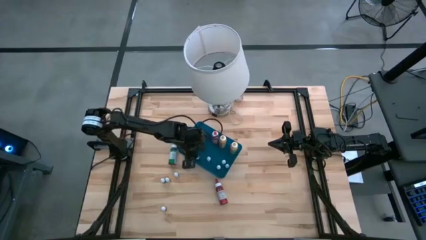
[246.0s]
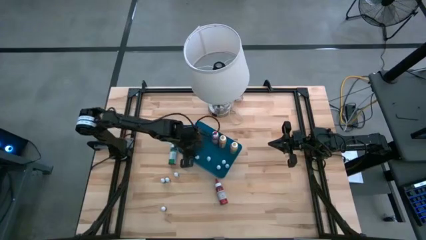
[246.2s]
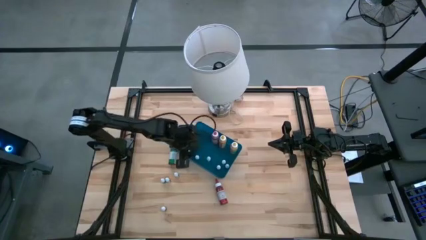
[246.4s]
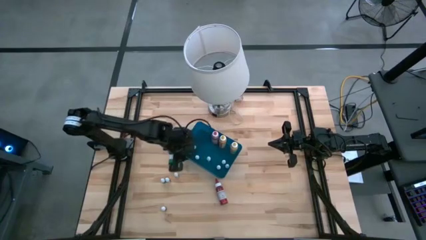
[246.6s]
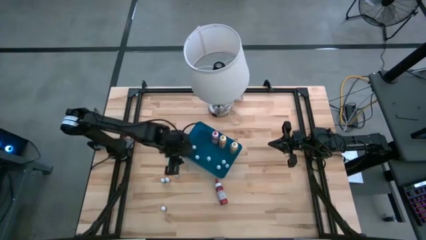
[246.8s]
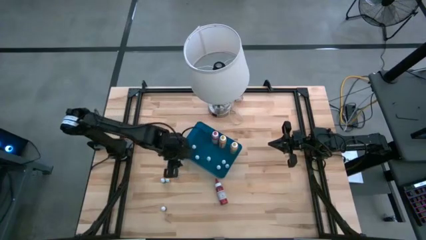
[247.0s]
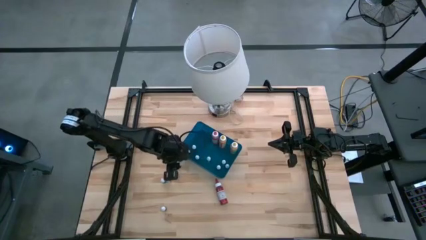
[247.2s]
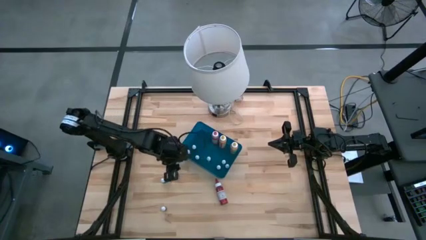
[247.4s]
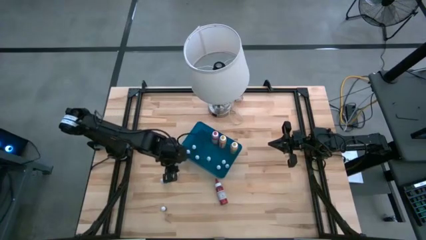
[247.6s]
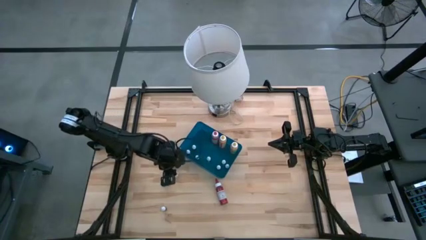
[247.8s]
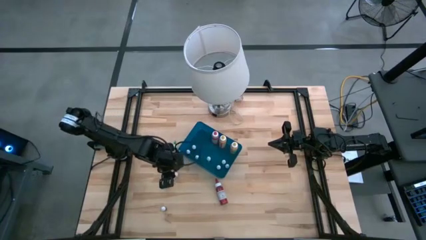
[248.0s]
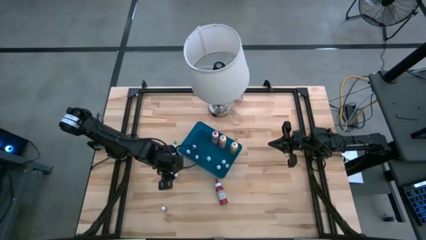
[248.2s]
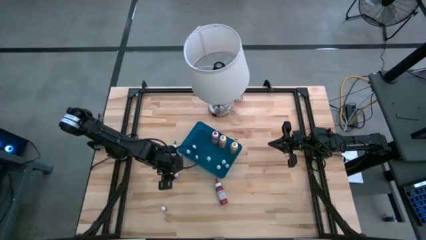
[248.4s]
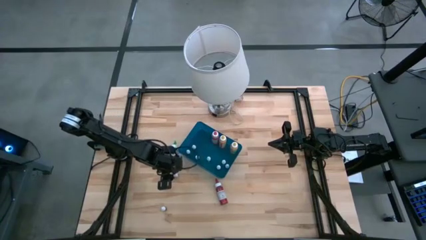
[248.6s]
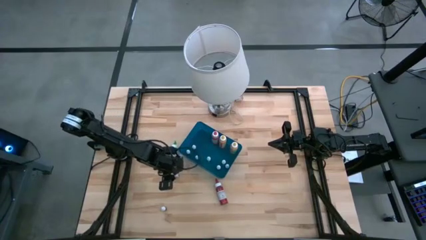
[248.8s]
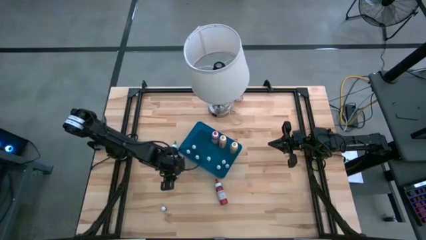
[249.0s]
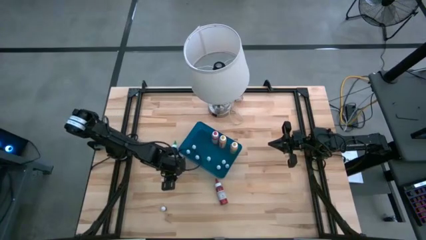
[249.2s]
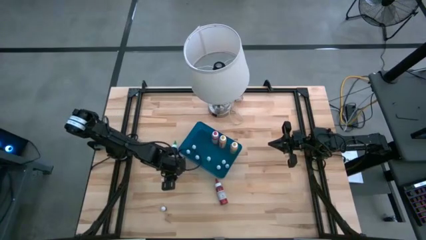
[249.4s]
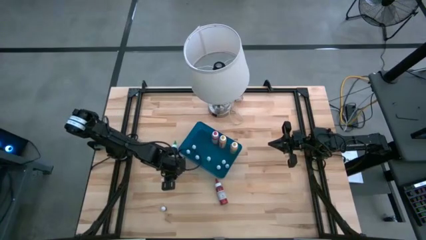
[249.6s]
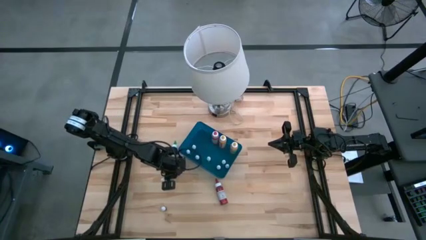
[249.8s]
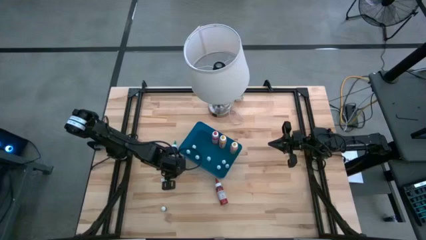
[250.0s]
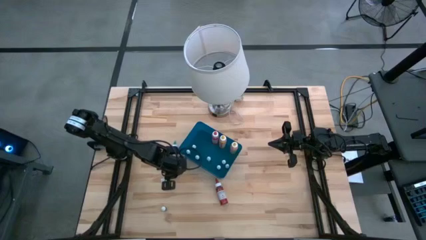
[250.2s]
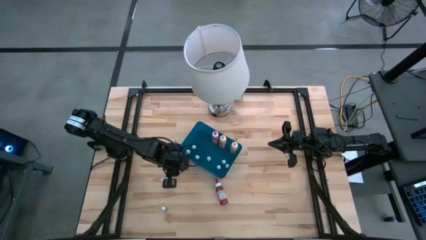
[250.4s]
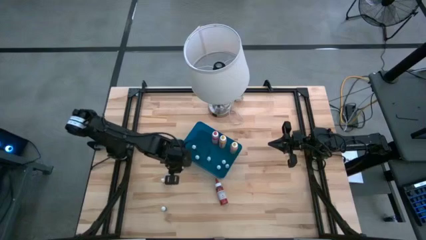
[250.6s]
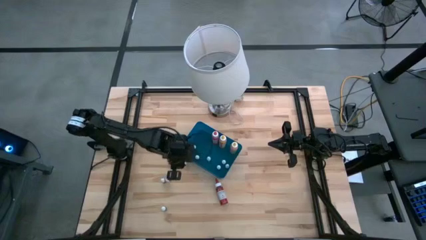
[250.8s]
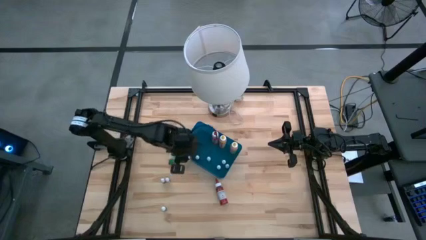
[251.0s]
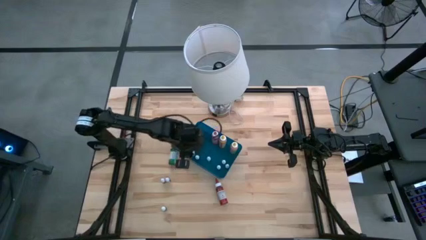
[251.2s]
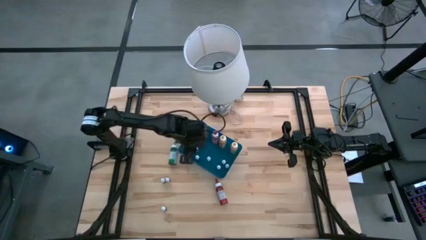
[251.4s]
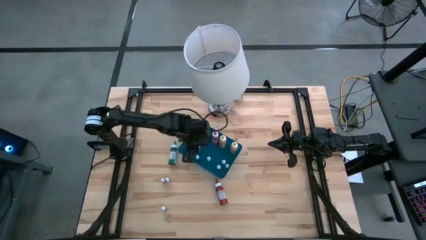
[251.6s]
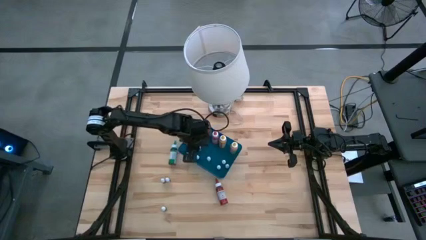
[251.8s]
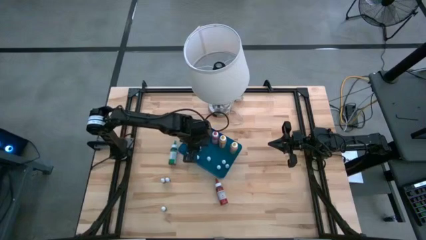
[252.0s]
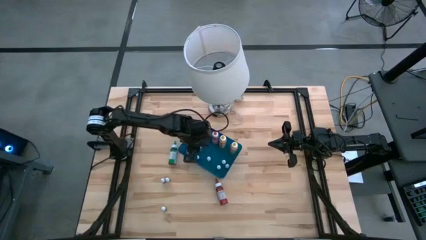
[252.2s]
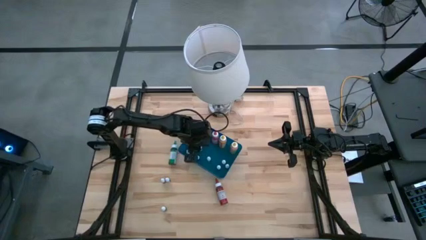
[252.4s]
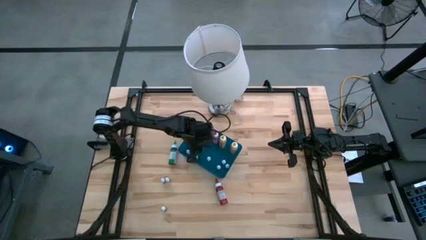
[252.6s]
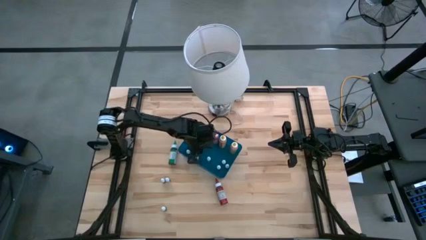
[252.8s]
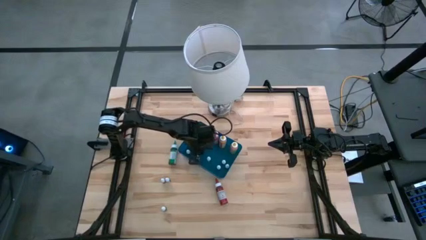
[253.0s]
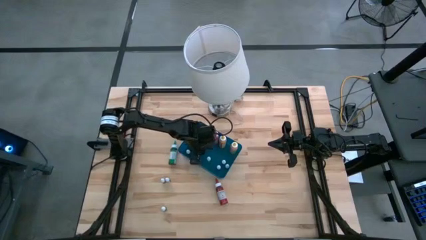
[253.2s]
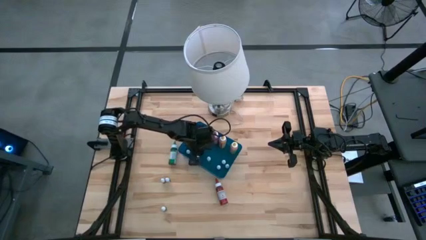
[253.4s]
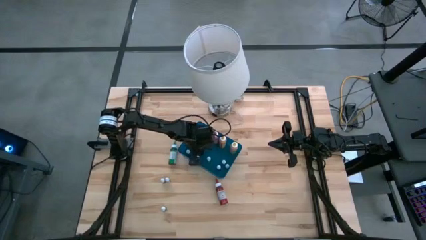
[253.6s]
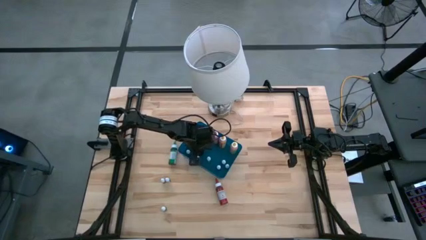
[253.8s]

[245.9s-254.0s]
Task: Pick & Place food coloring
Put the small black food coloring bottle into the blue container
